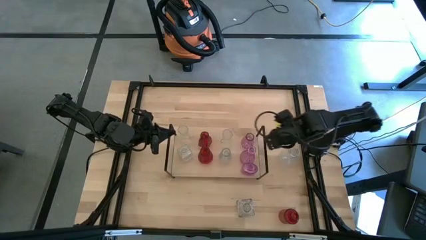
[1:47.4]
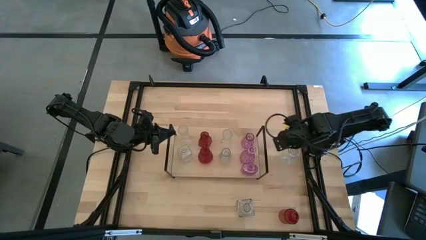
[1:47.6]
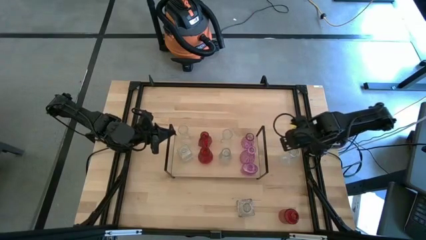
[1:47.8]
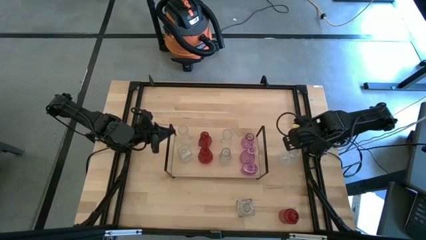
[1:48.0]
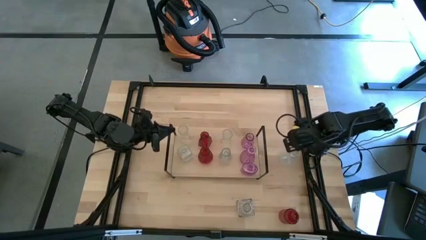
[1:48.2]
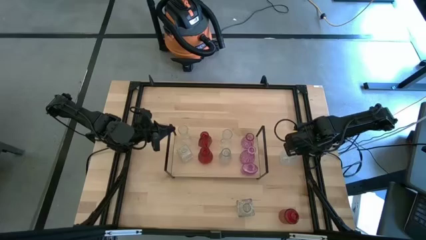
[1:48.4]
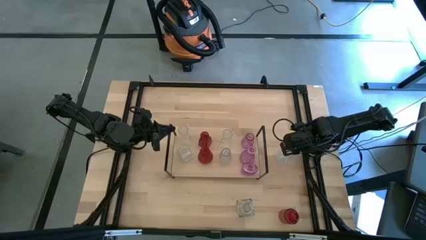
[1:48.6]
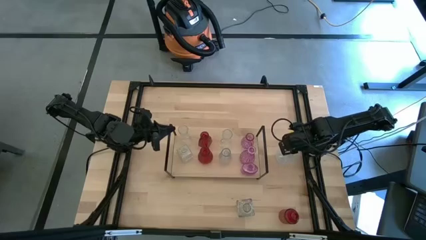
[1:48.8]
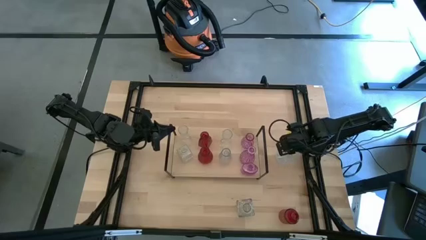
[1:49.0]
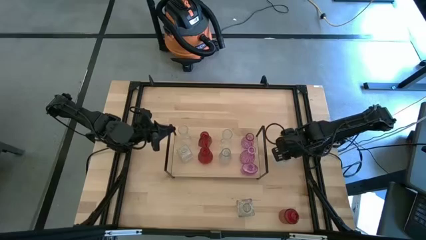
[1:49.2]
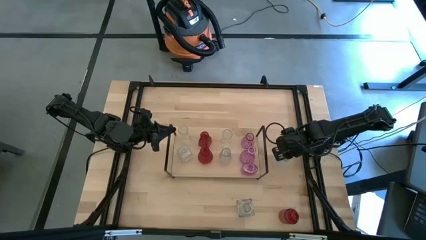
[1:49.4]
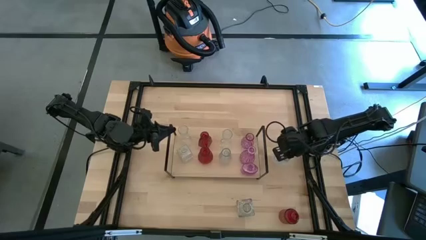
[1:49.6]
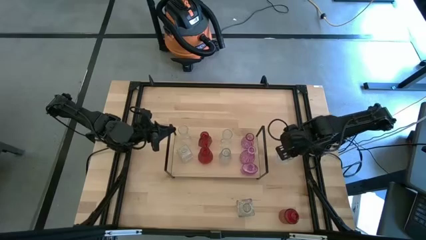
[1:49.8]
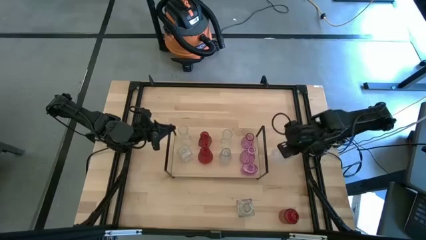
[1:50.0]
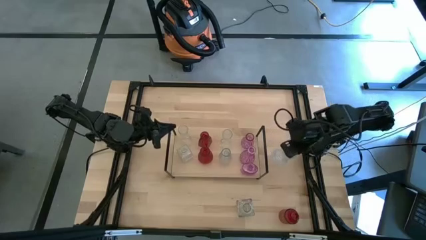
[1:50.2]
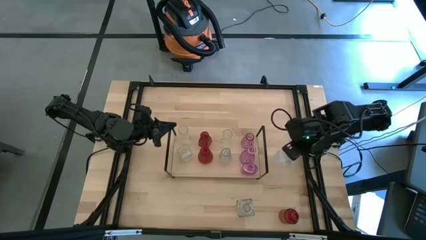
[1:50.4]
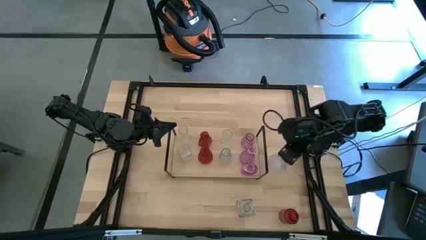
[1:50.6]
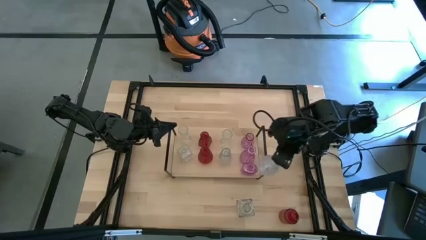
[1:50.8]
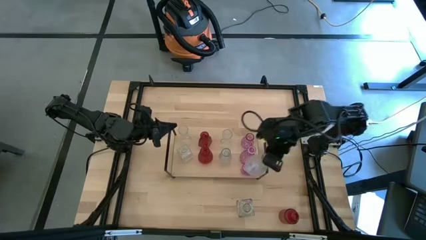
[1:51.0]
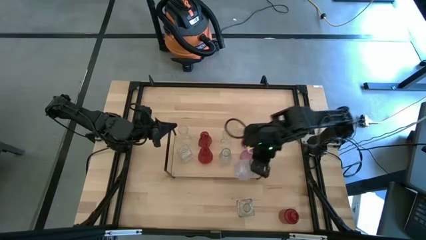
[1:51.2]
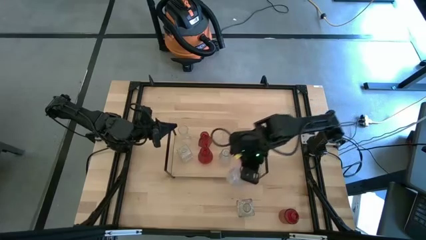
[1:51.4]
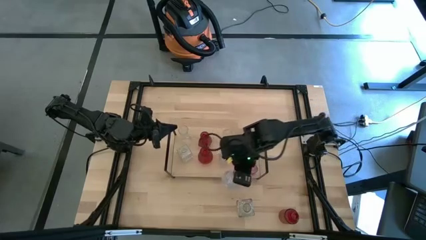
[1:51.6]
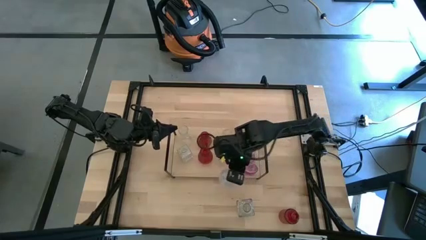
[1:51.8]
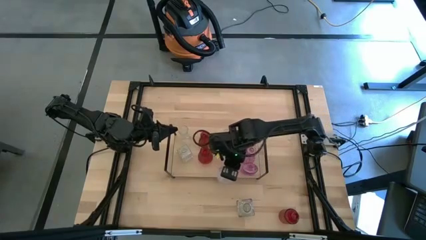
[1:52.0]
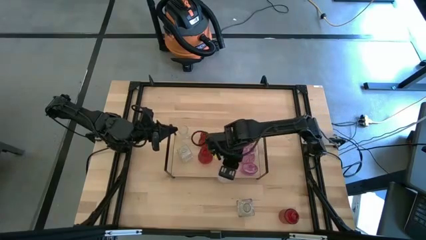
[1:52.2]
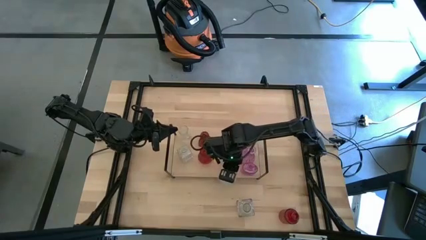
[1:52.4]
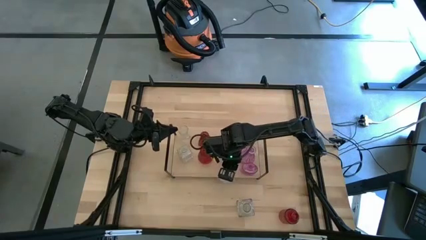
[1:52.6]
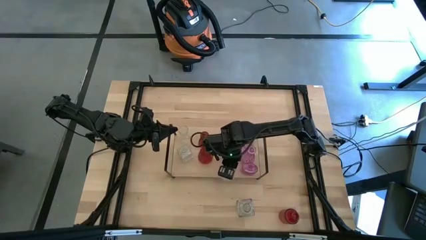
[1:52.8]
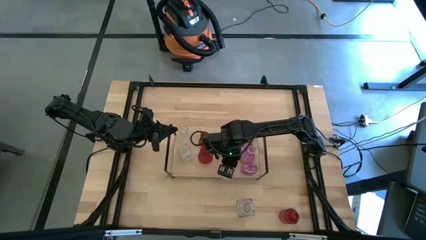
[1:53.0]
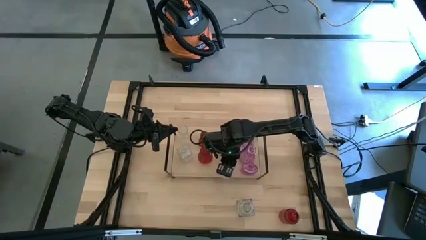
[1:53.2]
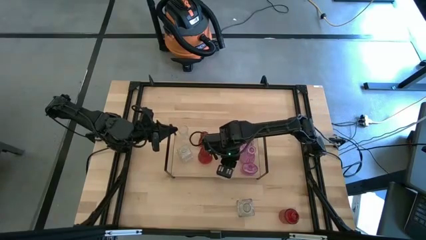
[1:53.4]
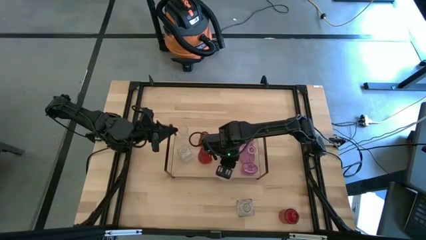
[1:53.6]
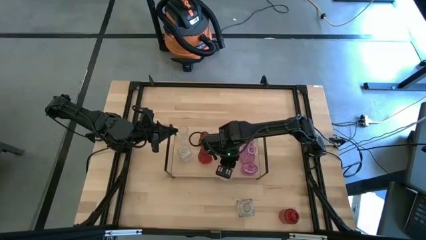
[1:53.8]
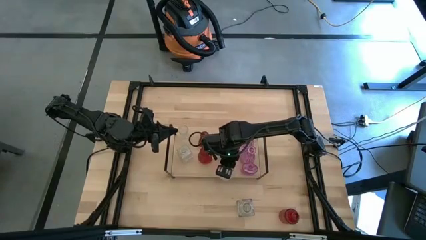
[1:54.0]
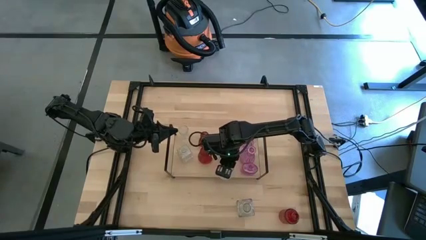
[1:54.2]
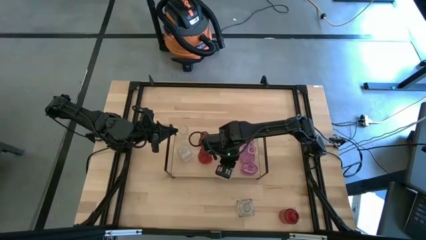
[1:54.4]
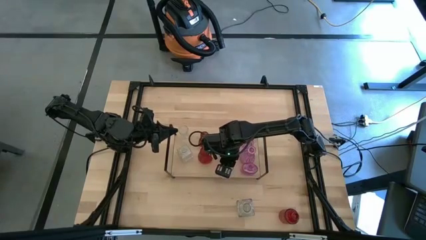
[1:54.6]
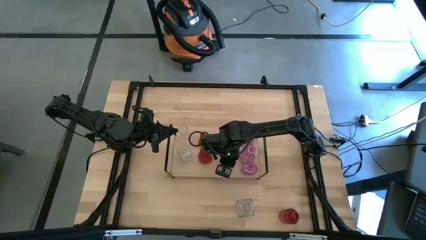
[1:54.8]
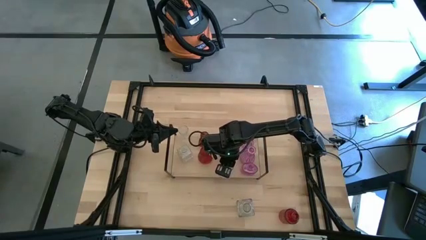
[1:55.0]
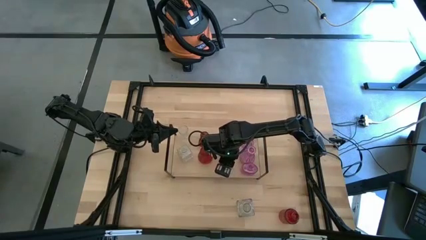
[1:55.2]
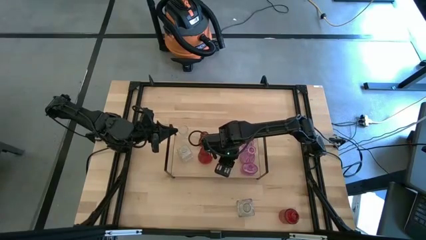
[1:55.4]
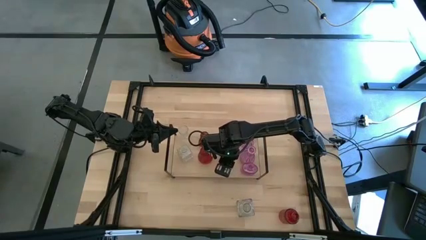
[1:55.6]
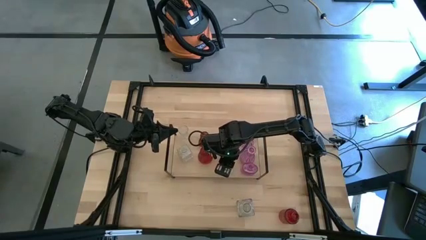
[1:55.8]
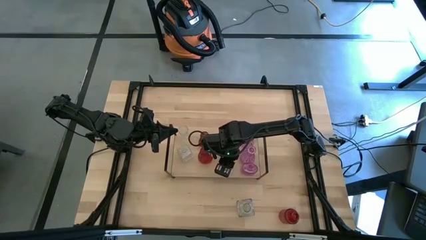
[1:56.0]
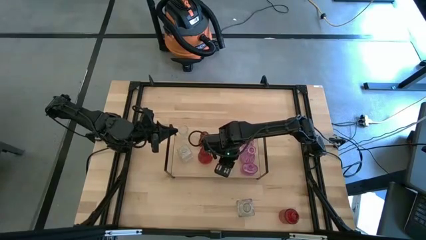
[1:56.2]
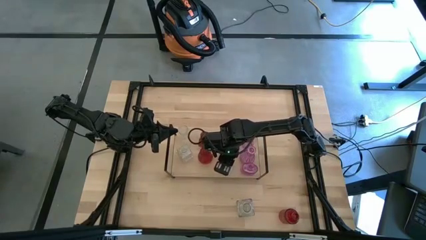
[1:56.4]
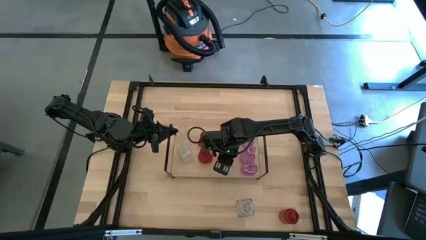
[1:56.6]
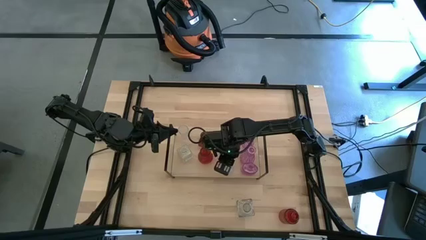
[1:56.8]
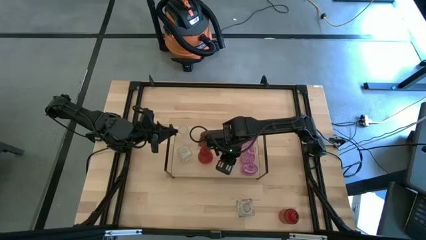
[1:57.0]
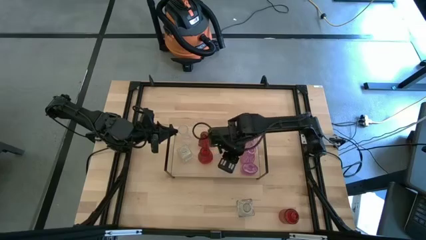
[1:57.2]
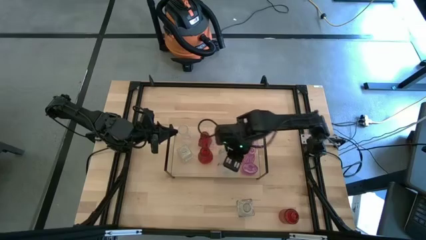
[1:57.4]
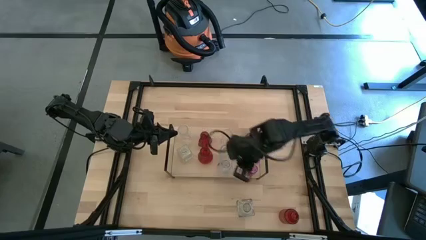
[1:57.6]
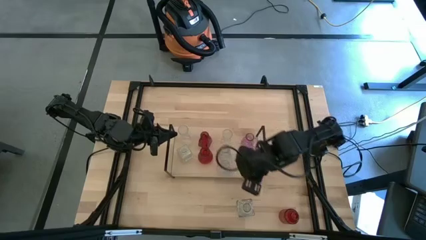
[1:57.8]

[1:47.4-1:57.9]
Task: sort vases onto shelf
Put the transparent flower vase on the shelf aligned with the other transparent flower vase
